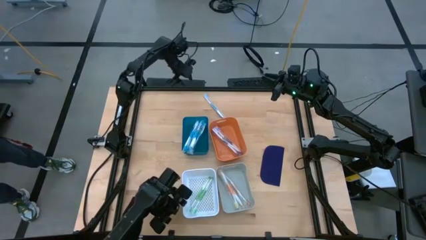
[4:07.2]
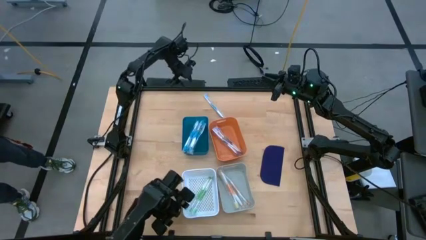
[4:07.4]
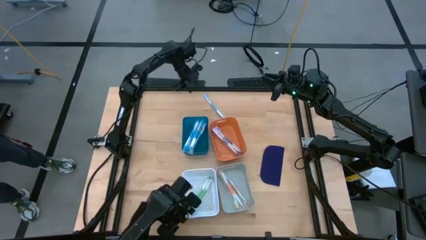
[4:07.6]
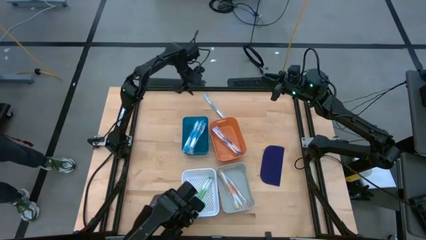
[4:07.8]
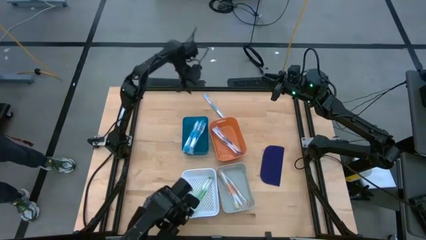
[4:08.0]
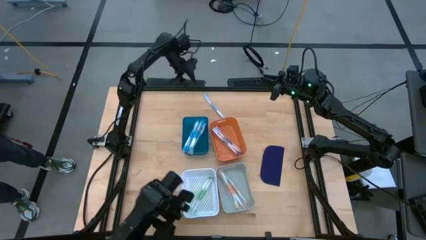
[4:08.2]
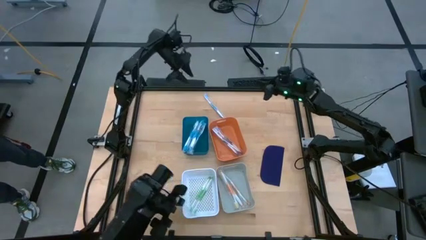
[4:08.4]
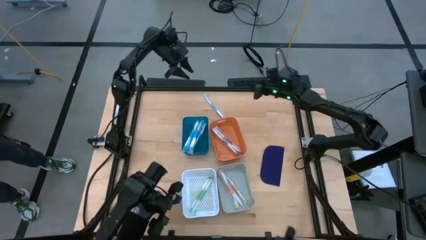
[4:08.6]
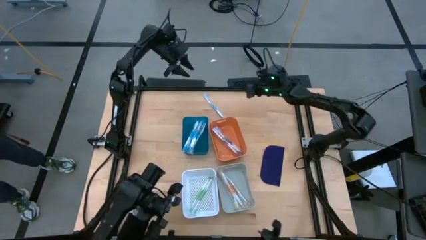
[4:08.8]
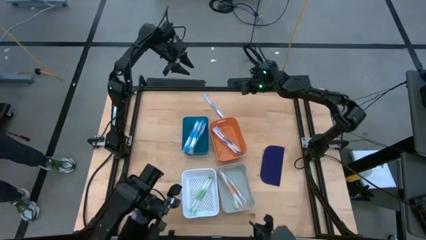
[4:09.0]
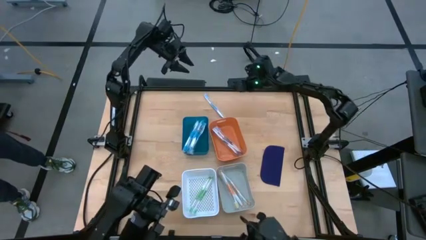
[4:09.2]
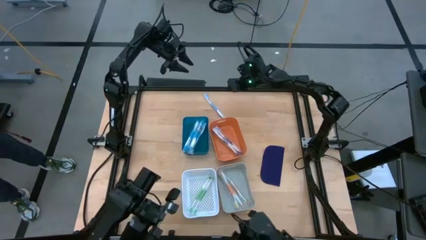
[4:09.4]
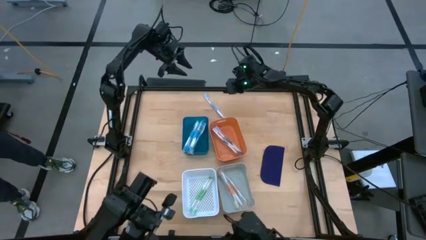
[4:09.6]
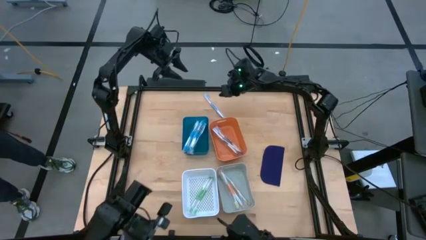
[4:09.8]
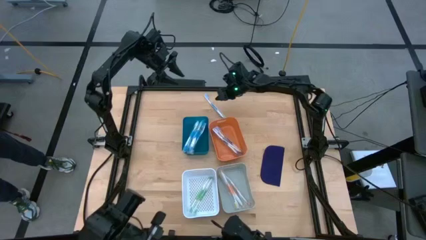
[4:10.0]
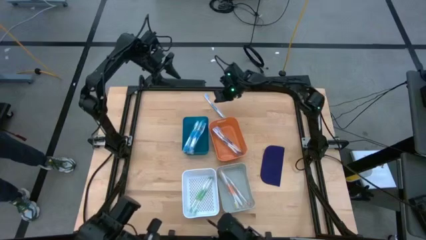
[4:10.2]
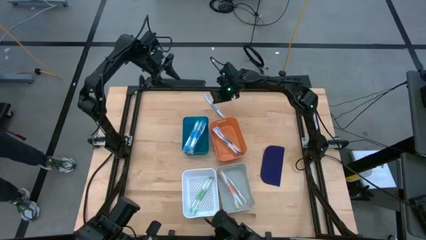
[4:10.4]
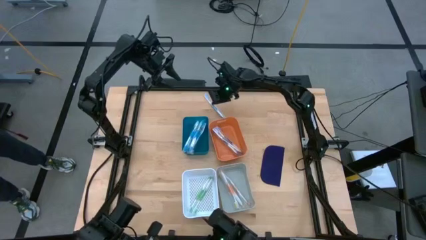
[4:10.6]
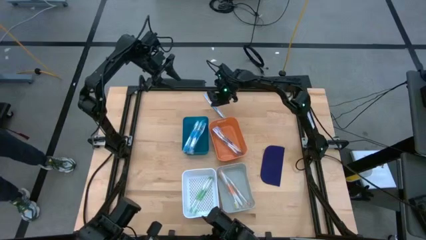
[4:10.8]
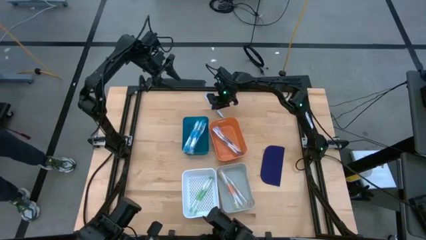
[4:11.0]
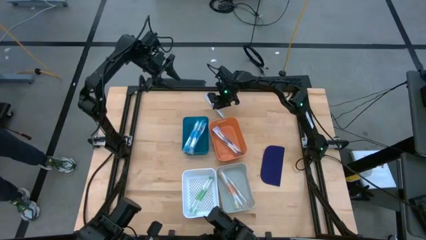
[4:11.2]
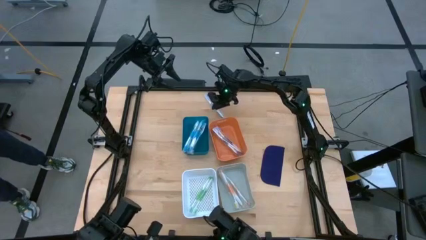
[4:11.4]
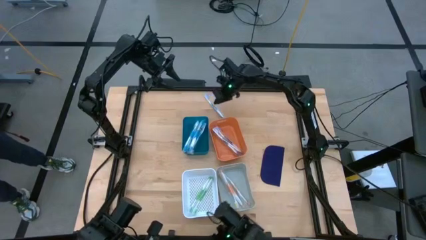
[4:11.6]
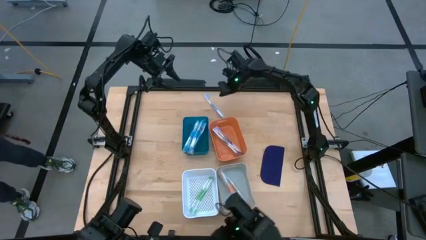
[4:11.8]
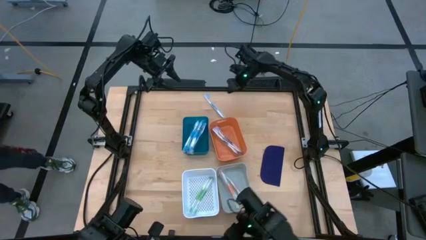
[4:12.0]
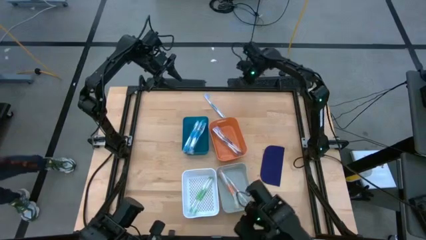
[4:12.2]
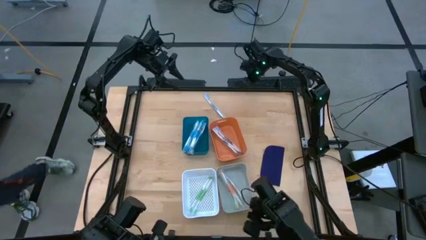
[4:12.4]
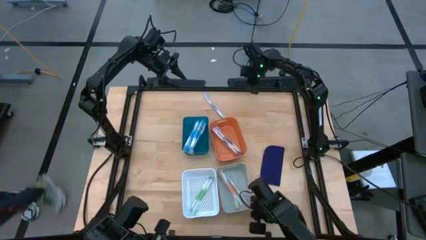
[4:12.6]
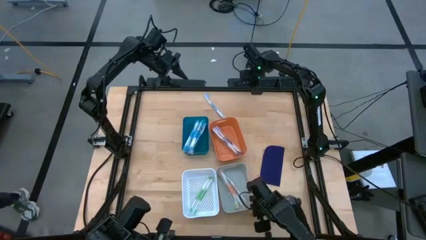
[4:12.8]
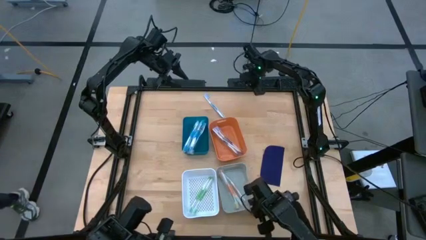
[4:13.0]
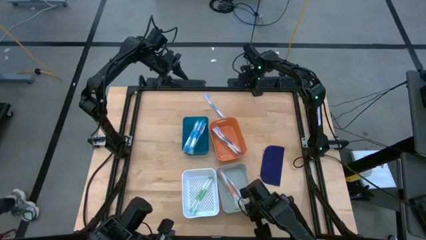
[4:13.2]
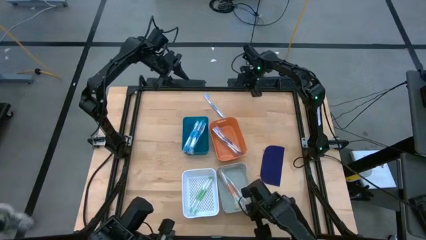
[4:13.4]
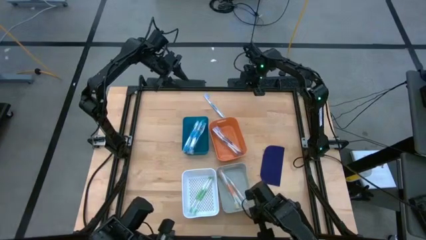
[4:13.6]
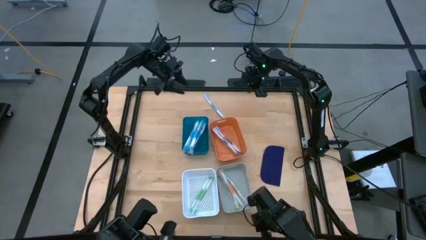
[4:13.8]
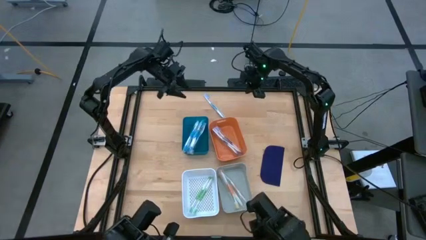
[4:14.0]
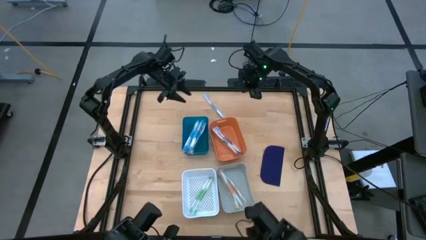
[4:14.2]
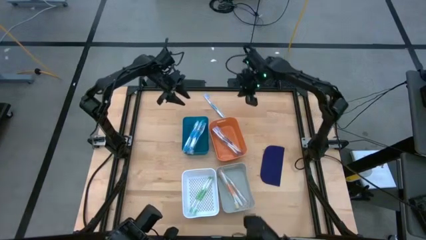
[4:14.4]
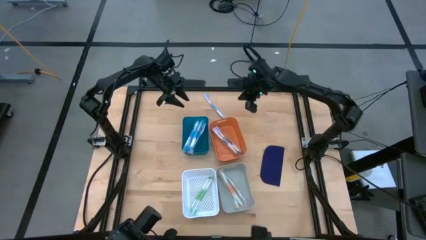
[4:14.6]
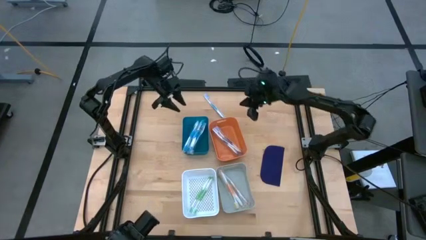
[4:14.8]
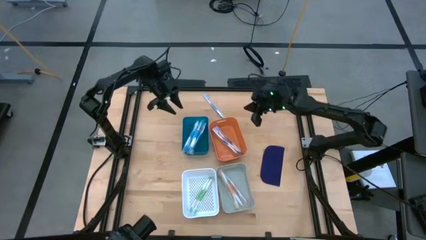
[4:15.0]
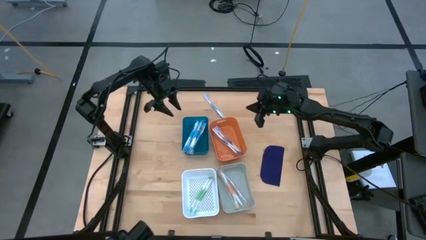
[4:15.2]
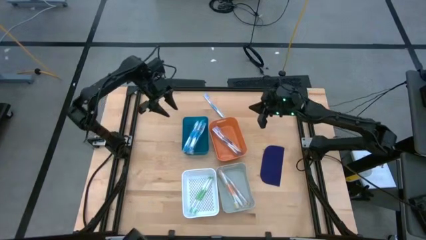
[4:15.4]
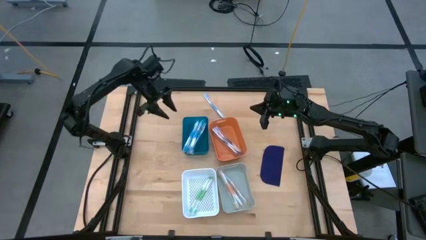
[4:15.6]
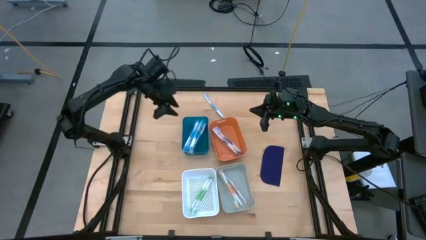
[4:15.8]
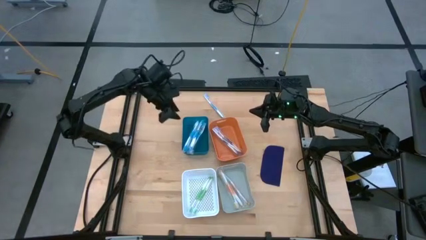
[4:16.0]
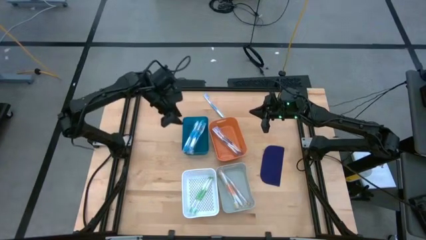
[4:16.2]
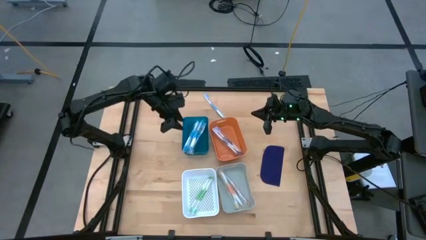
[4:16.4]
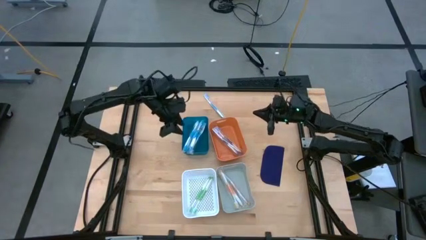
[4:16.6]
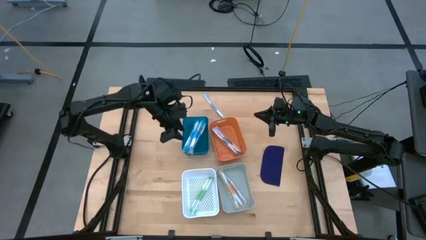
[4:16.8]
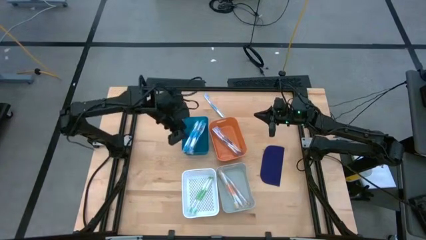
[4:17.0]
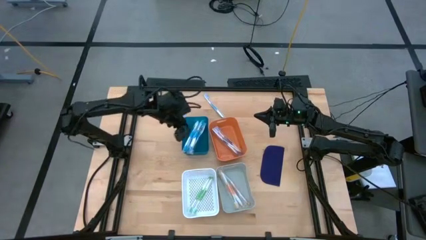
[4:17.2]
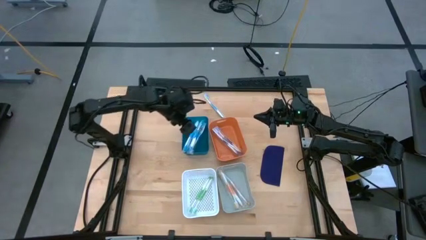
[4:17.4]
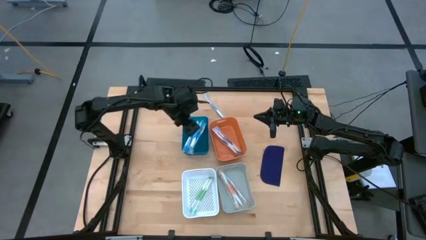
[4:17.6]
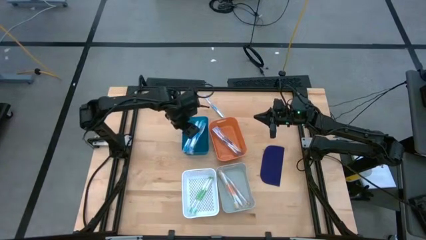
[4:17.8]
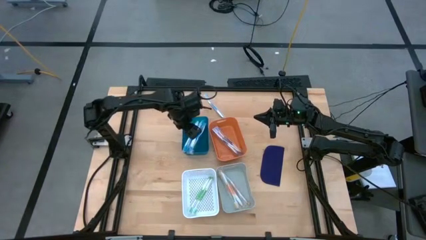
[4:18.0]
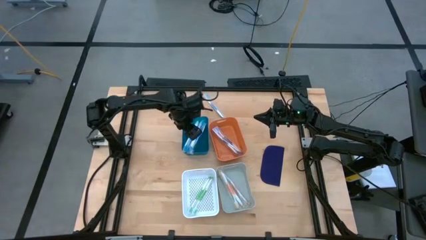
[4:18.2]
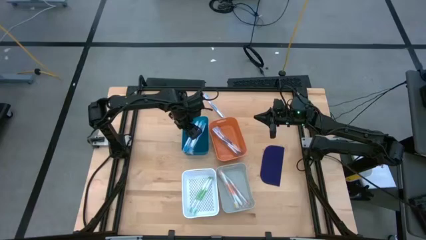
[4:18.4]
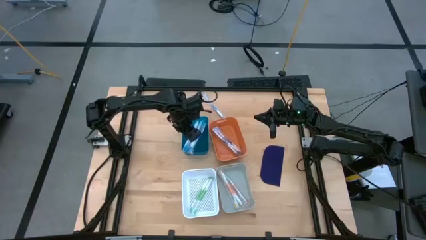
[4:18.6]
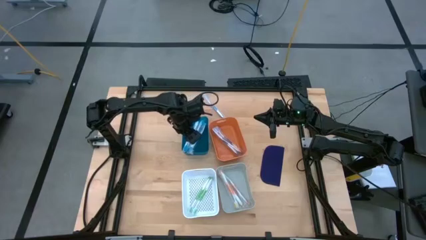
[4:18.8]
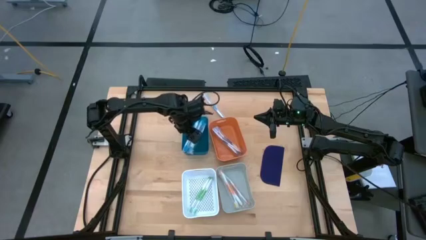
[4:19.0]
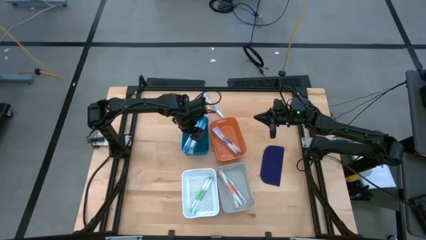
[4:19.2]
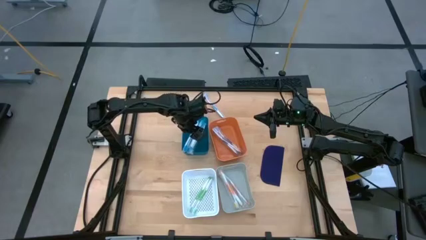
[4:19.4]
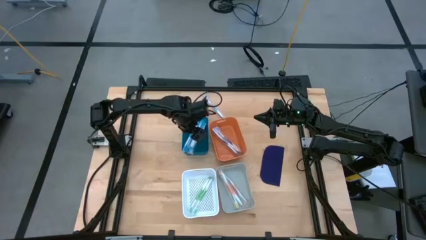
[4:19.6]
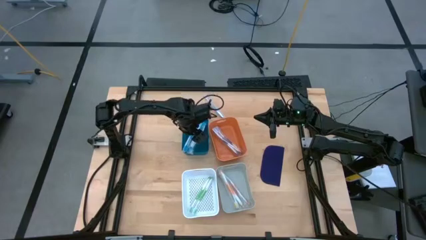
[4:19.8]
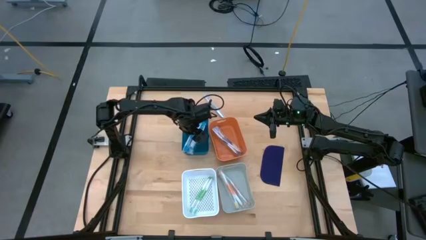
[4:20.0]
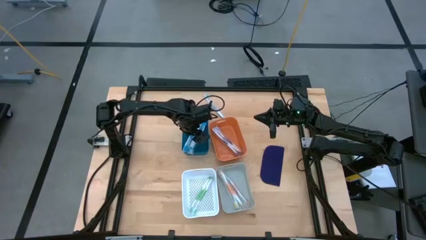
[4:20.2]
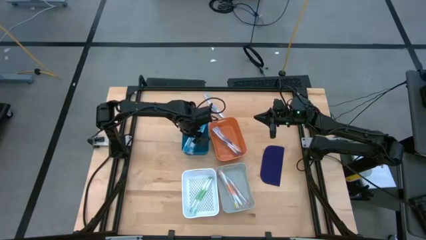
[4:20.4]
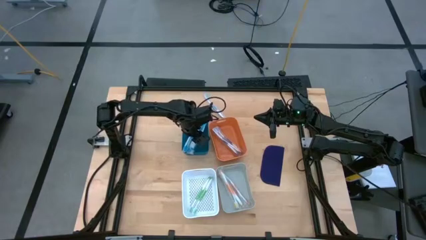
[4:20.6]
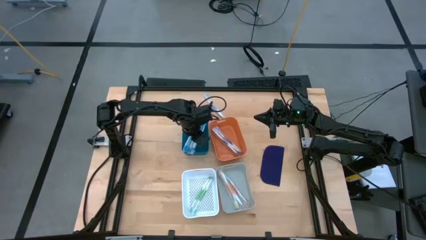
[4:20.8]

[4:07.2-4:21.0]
Task: Pick & Place Toothbrushes
Adjust the blue toothbrush on the blue bin

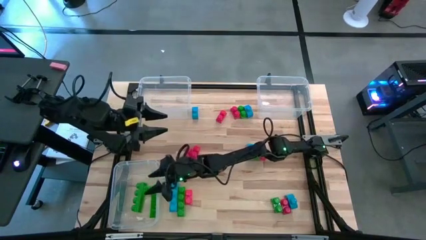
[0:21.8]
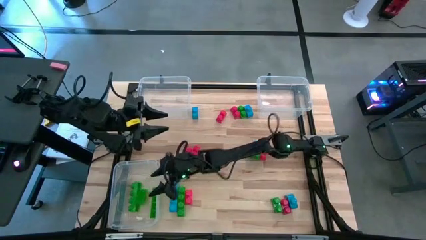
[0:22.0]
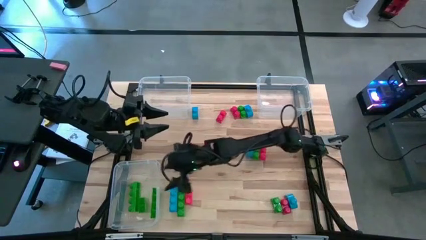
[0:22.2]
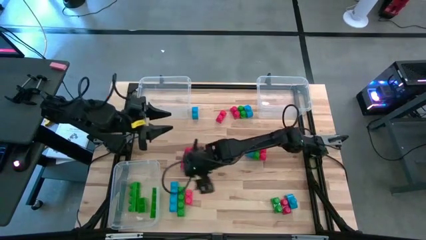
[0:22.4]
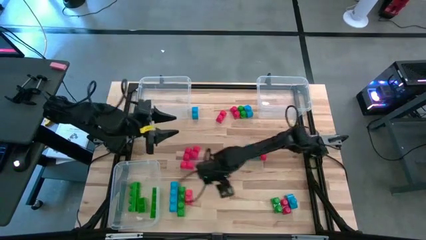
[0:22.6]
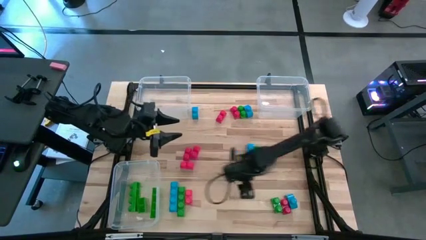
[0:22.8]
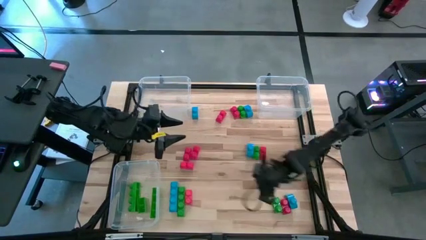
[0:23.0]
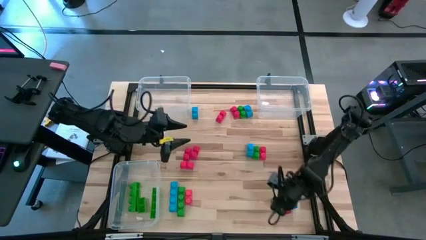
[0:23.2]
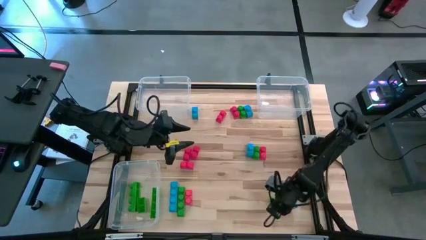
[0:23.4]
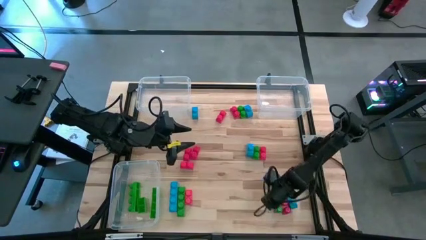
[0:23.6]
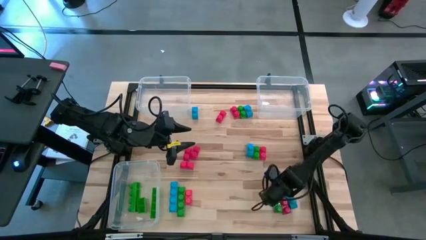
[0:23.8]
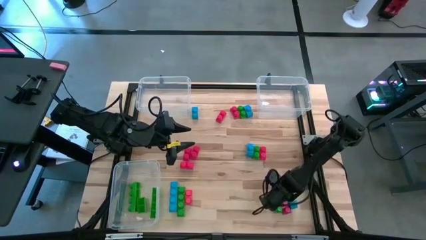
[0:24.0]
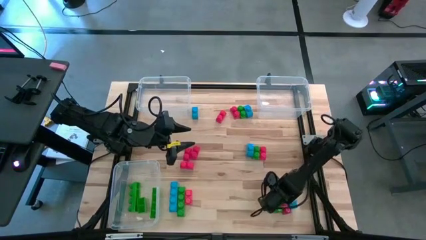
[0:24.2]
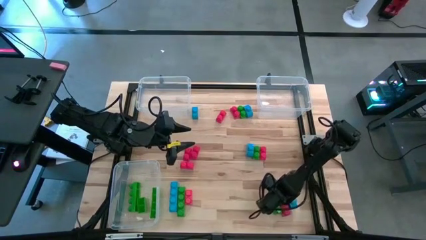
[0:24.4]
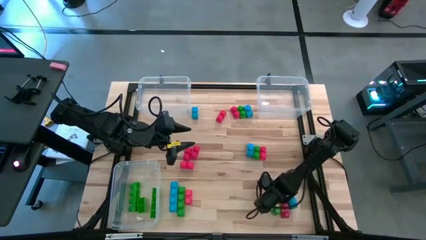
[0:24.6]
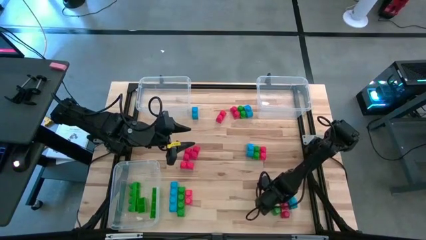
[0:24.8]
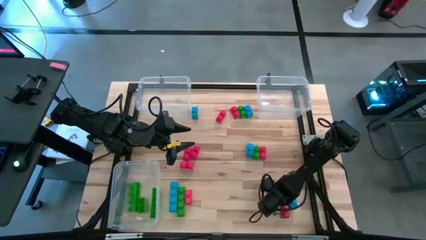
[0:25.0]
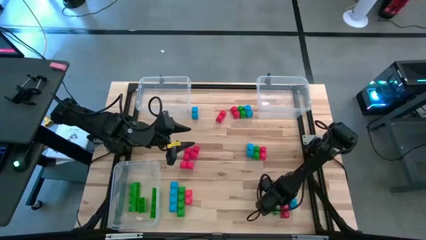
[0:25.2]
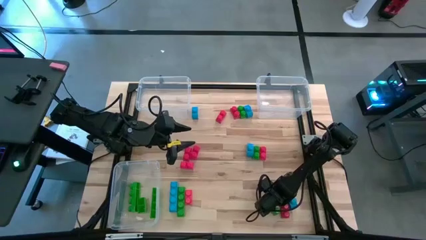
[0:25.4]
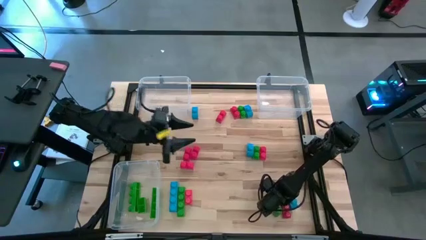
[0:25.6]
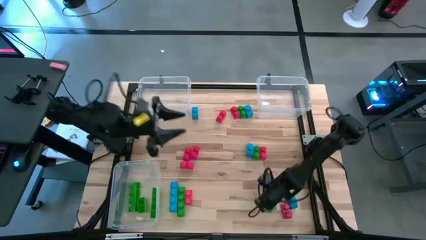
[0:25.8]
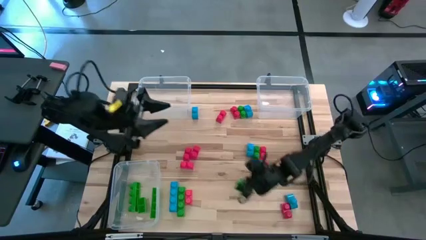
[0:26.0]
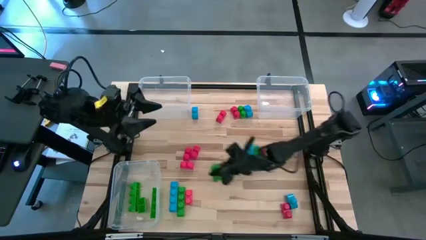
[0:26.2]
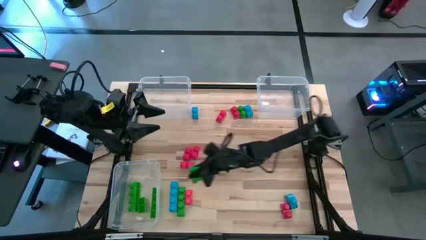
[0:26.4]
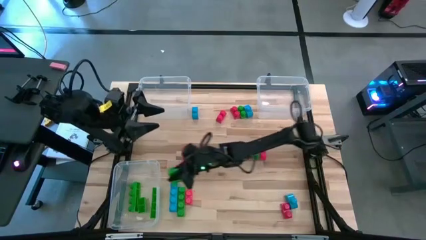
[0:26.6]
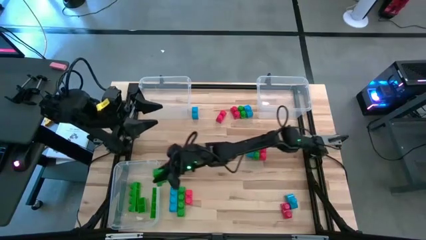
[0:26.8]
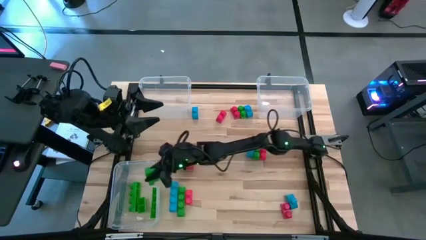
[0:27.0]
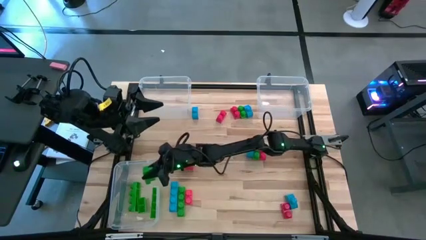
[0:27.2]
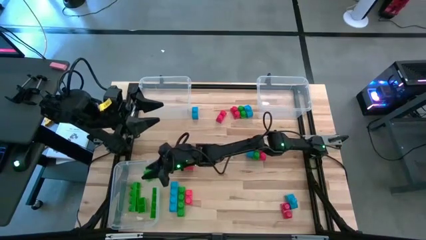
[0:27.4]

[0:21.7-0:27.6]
Task: Sort blocks
Put the green game piece into the bottom left transparent bin
